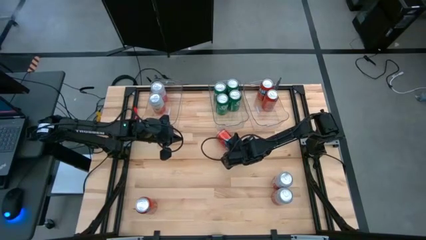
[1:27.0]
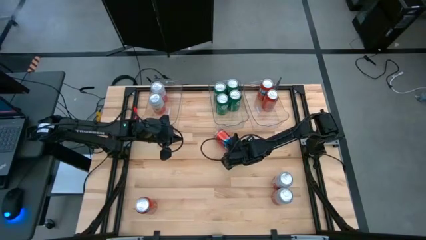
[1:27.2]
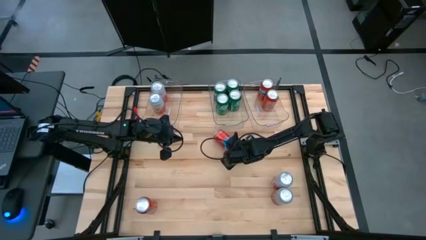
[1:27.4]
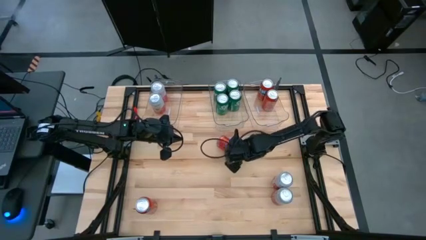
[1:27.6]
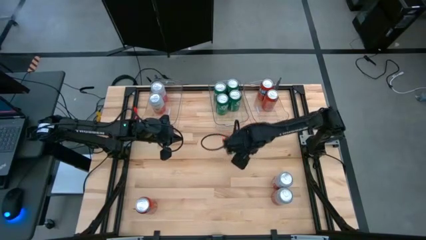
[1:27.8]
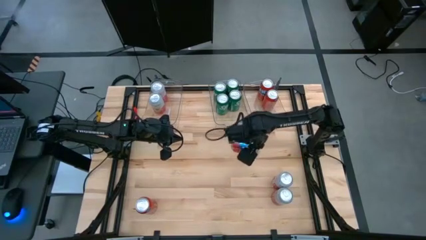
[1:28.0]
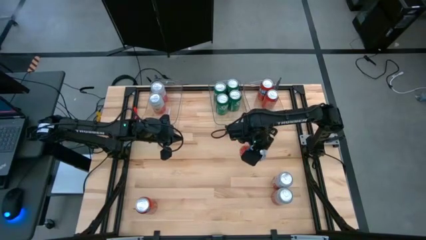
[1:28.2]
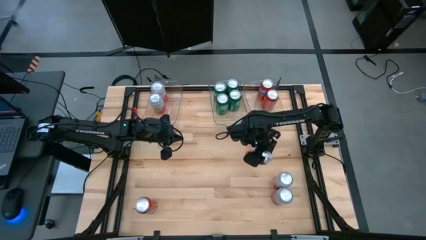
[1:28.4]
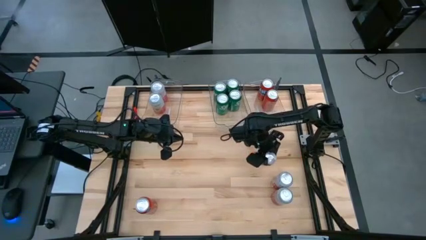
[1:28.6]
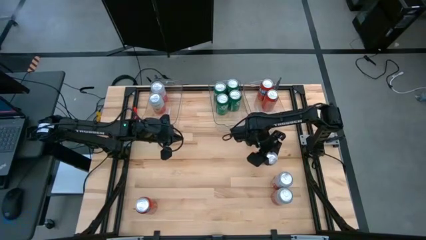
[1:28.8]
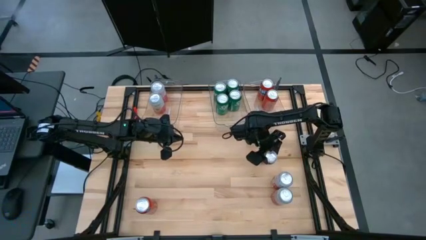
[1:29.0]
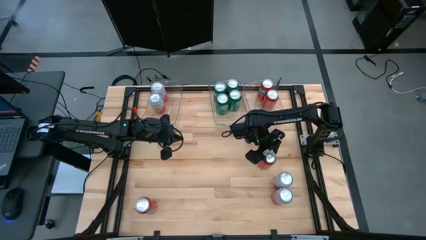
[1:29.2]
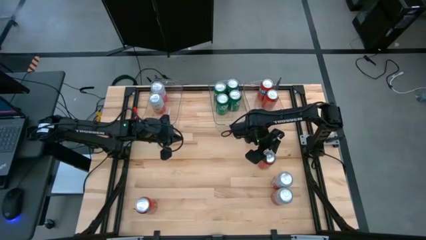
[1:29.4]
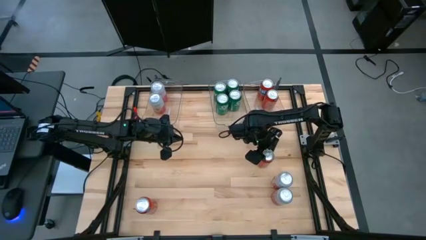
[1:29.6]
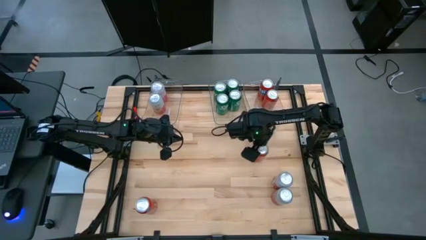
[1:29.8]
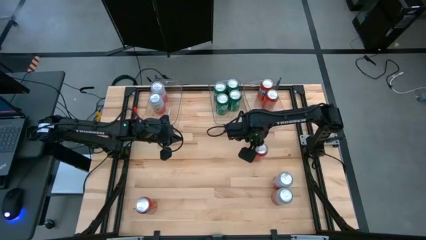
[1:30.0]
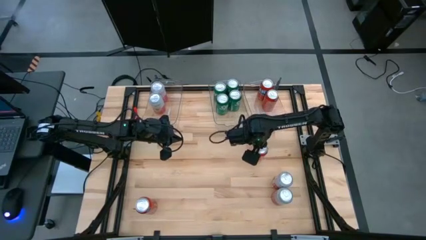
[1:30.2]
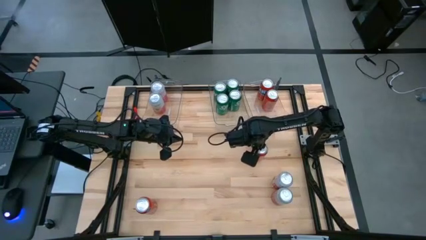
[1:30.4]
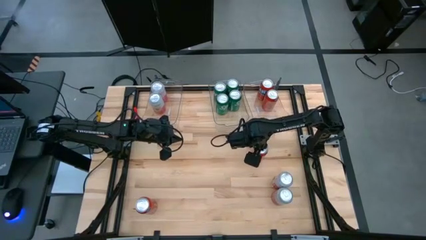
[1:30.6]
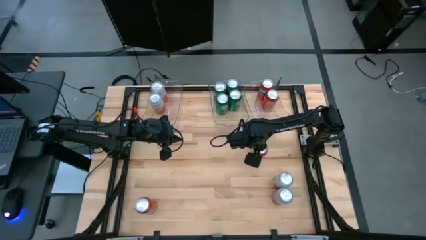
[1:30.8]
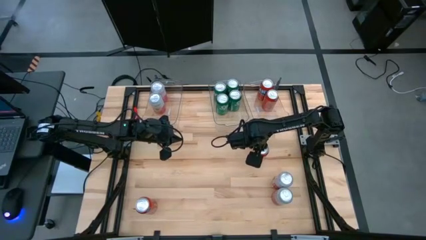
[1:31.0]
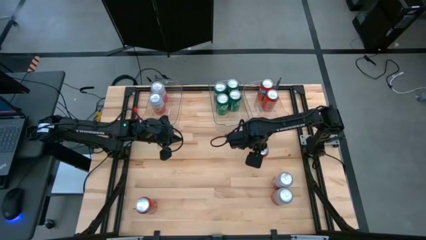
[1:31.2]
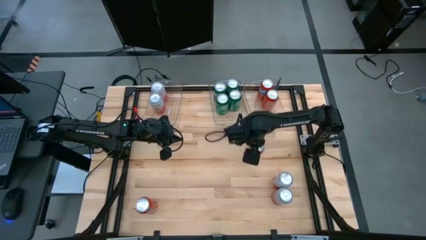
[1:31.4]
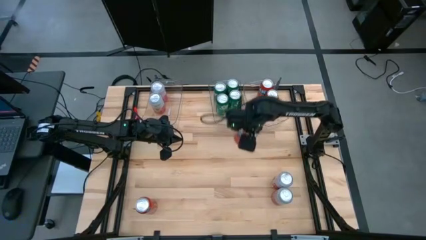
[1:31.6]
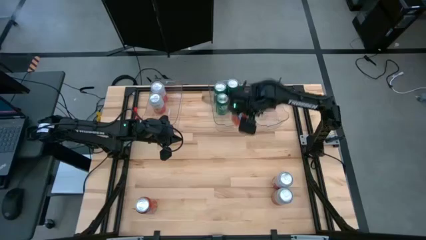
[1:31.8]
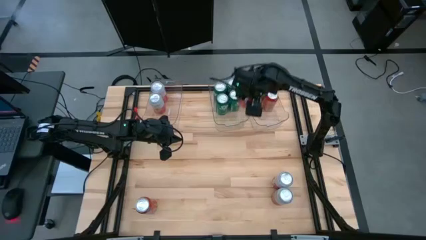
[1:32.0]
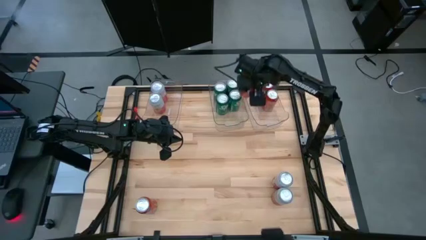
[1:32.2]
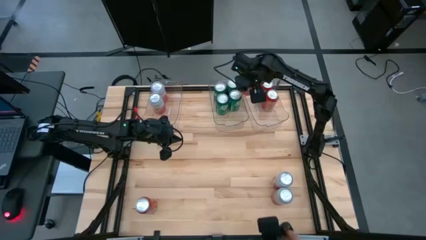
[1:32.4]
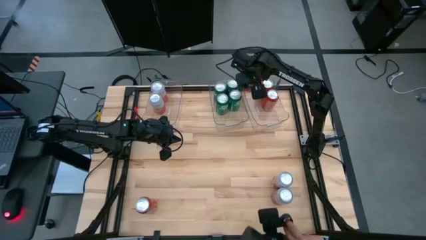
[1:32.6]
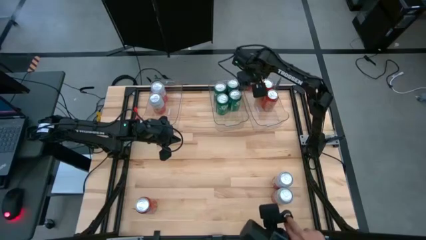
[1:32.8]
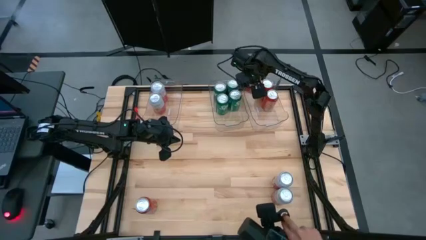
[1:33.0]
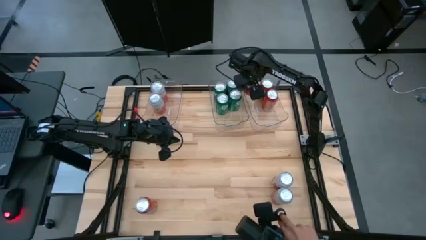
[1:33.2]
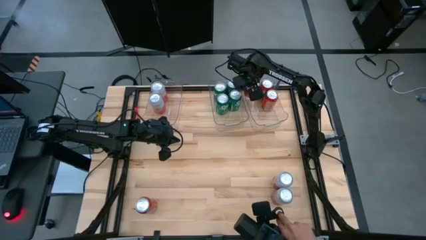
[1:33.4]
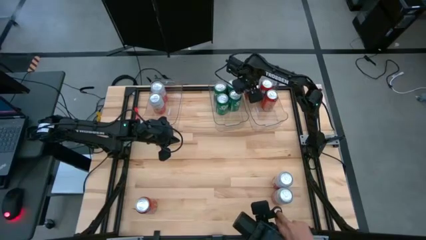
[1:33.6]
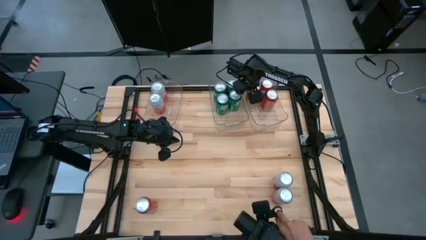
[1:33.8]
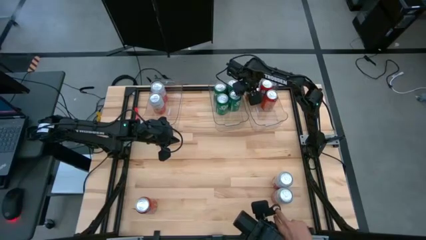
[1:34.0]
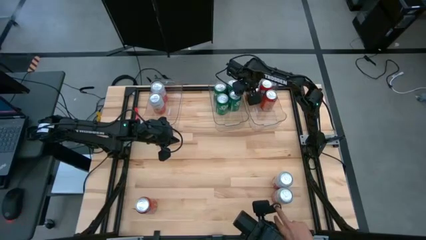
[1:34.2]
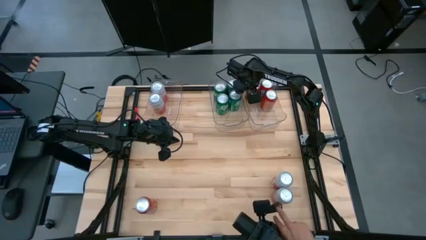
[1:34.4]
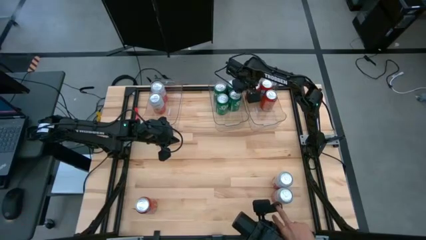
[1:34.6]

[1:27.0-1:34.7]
Task: Sort soda cans
Put the top orange soda can into the right transparent bin

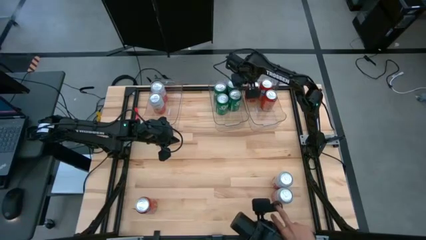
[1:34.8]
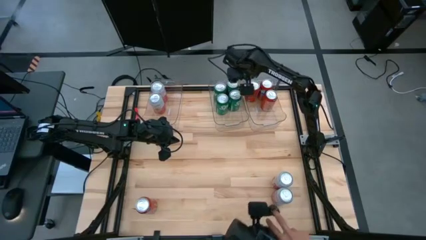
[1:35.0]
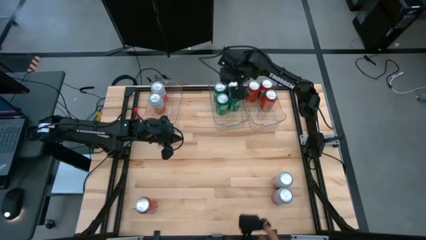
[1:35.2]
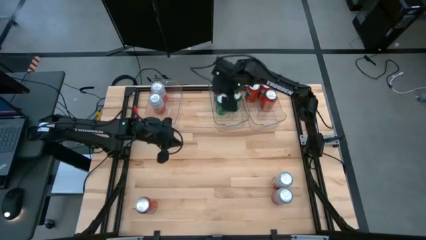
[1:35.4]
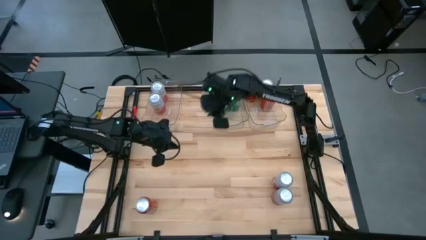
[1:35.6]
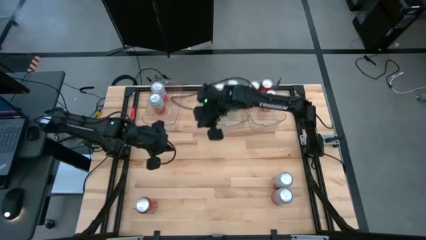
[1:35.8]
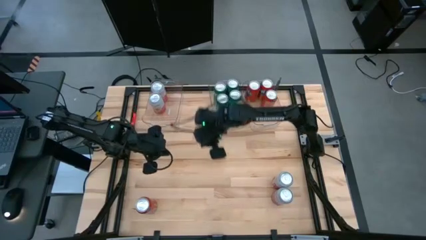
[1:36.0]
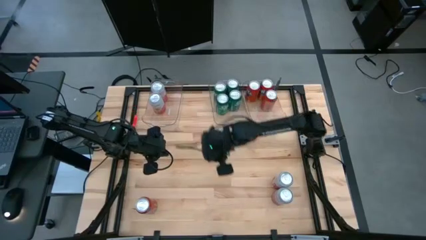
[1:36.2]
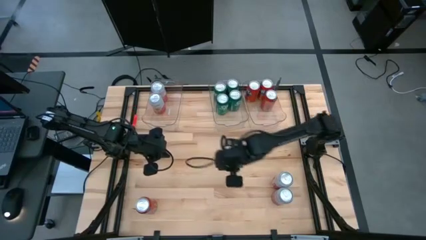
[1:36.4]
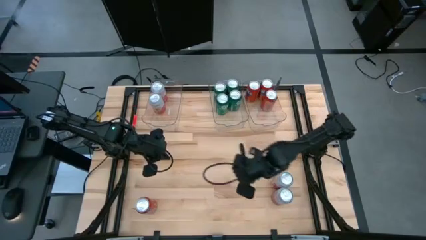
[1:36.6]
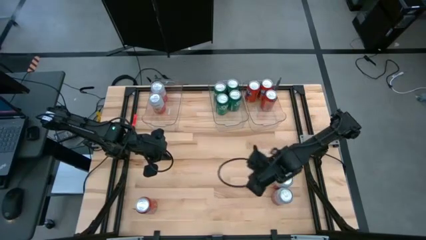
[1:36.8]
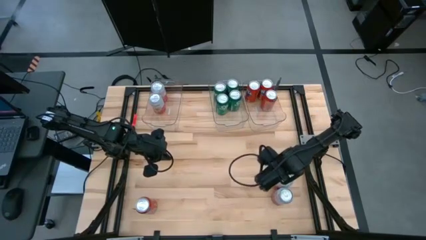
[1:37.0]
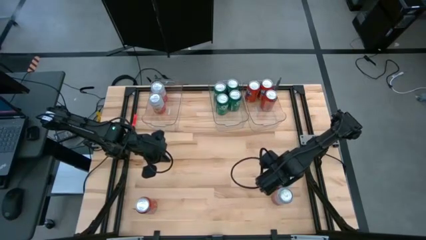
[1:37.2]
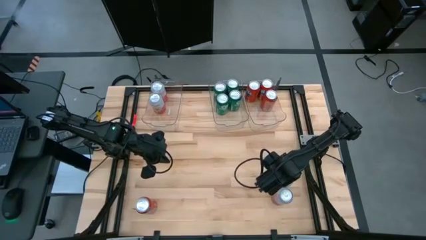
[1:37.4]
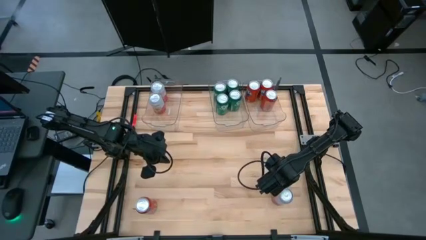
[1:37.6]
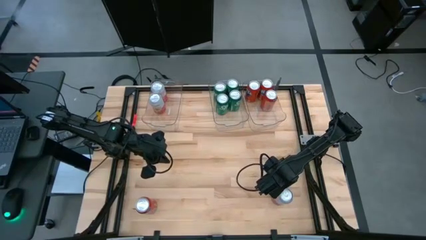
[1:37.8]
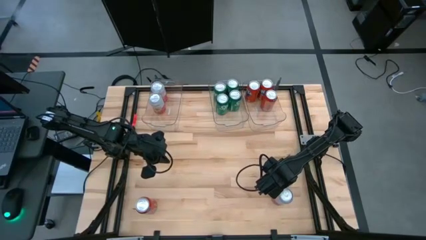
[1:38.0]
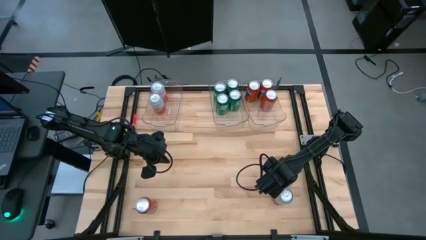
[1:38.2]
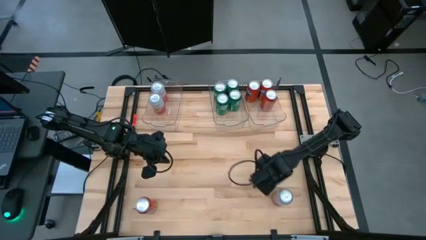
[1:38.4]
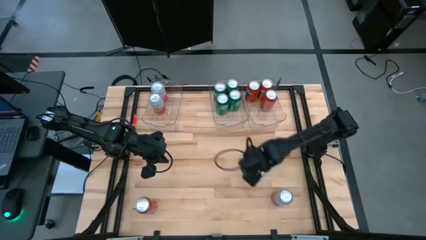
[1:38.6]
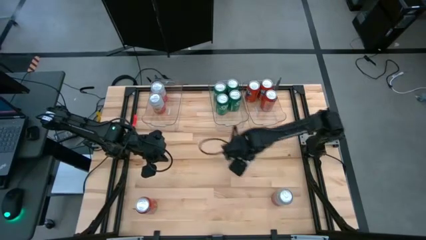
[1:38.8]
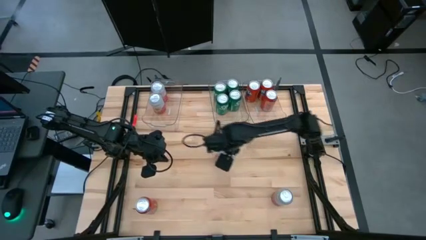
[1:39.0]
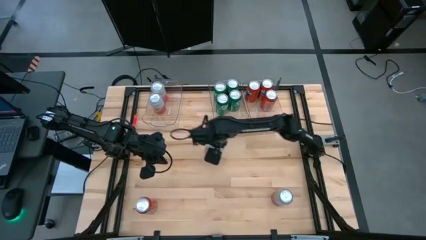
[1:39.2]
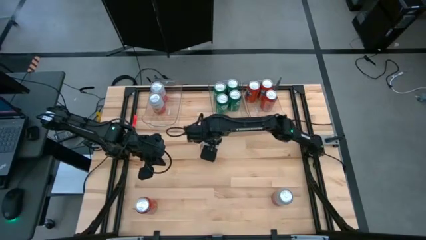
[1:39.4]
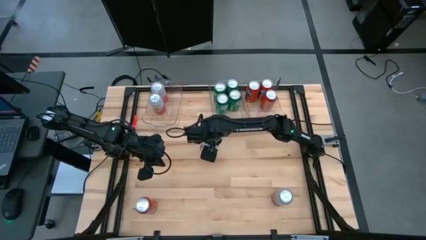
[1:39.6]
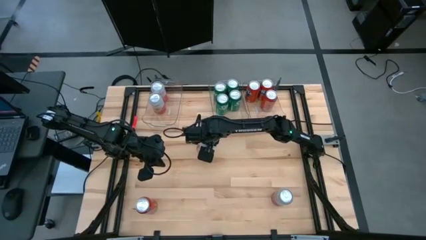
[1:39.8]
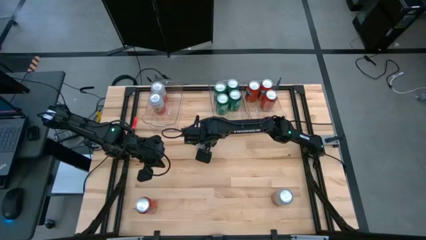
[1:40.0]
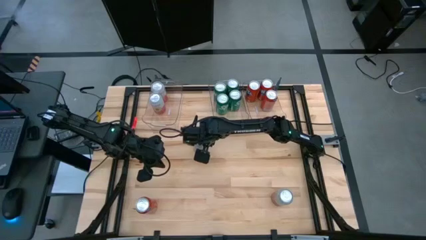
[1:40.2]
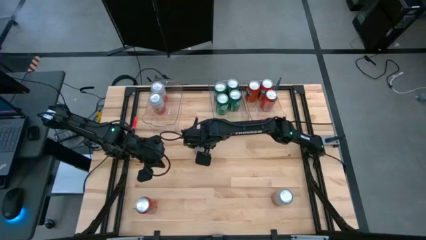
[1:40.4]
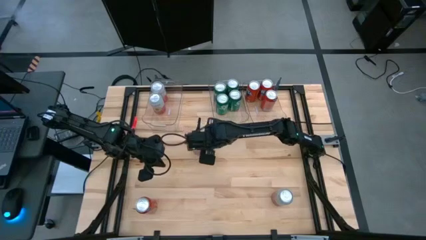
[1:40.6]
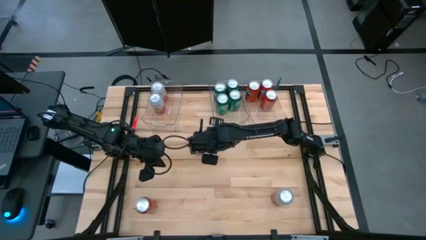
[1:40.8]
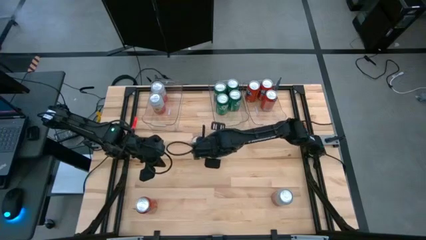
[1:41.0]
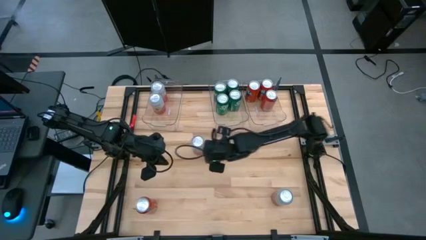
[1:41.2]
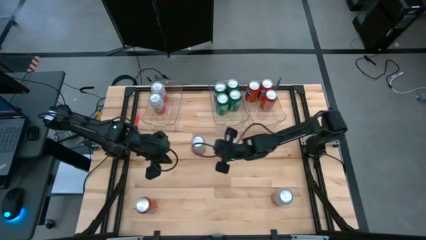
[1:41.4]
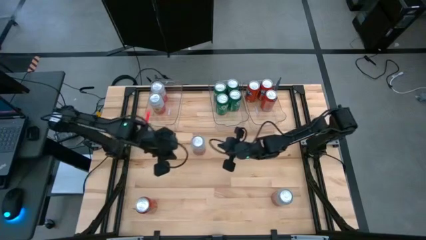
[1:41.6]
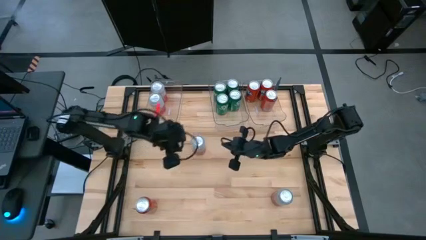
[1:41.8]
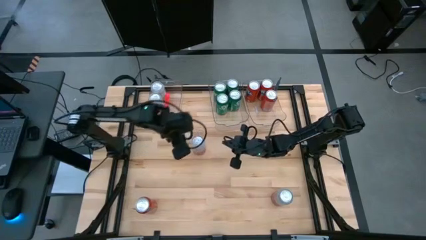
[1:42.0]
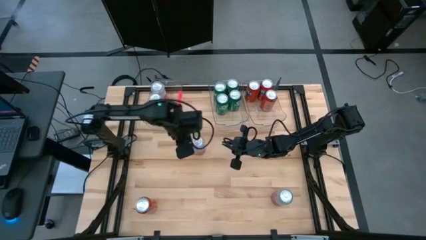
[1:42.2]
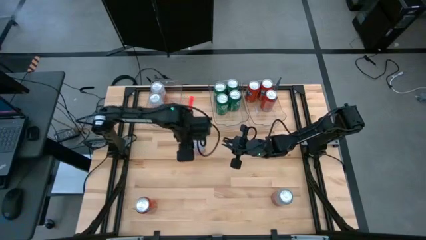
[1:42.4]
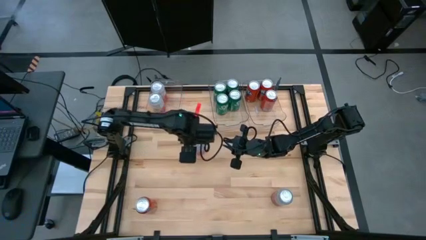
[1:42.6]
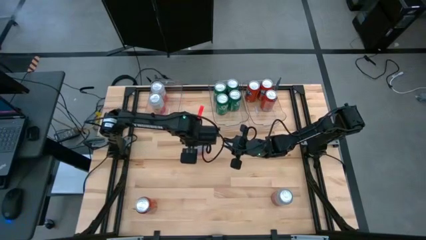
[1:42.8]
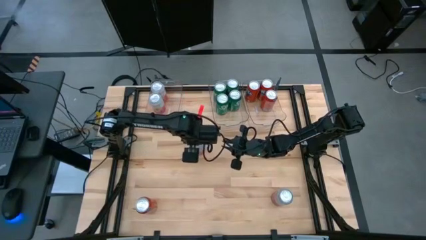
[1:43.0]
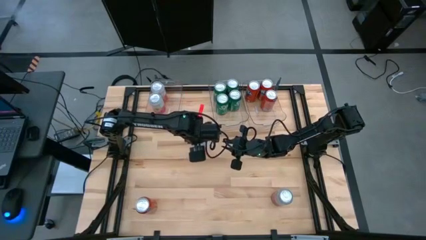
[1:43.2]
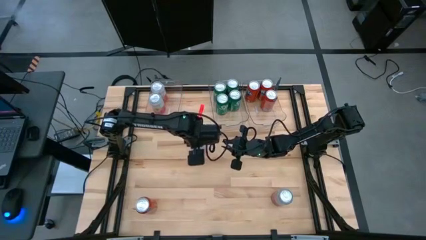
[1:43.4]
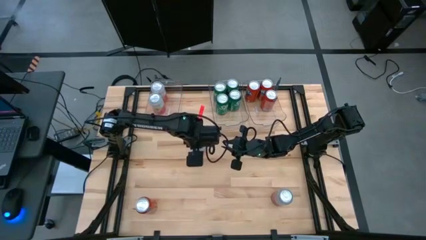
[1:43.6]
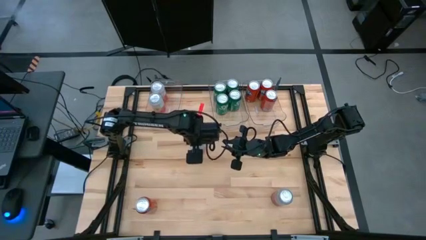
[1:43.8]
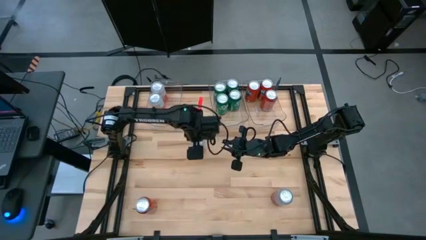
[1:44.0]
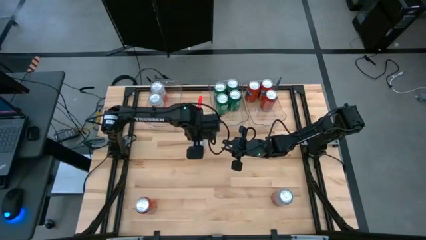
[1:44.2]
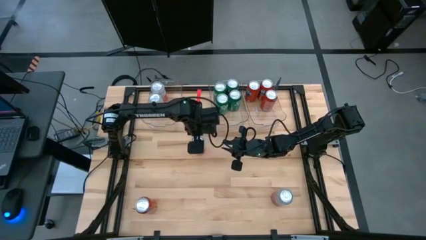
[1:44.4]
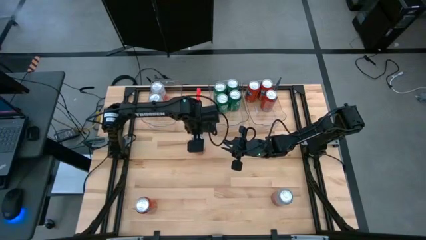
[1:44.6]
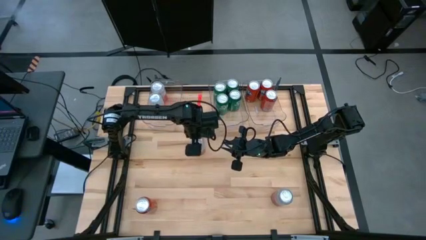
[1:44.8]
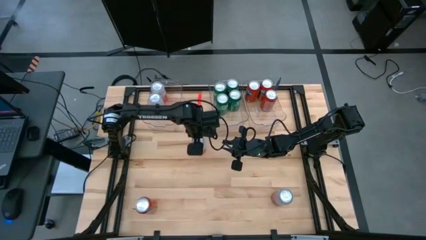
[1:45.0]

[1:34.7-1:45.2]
Put the top pink-white soda can into the left transparent bin
